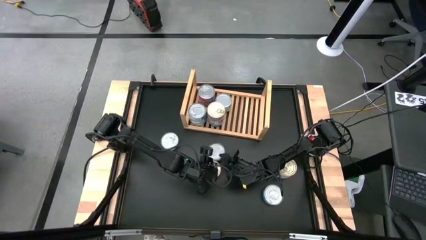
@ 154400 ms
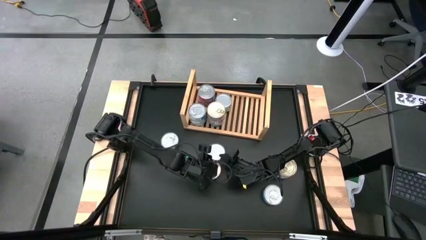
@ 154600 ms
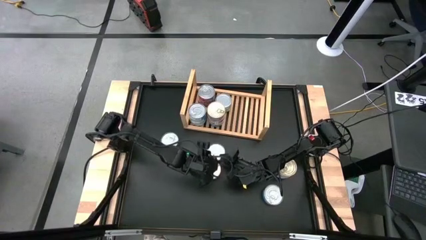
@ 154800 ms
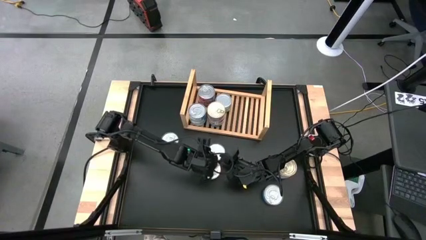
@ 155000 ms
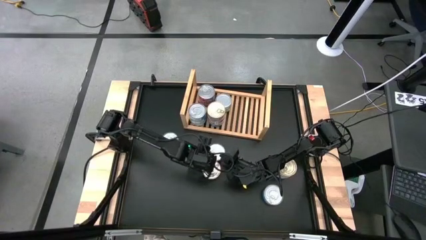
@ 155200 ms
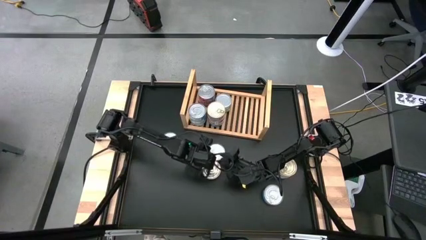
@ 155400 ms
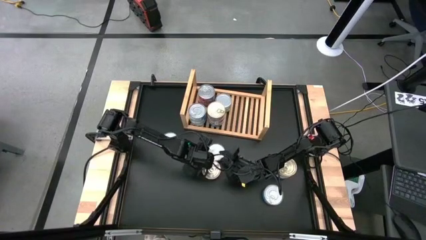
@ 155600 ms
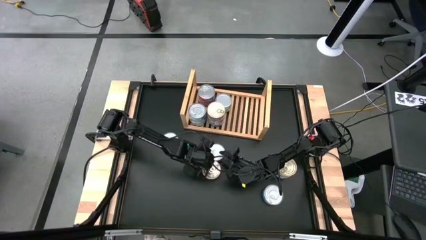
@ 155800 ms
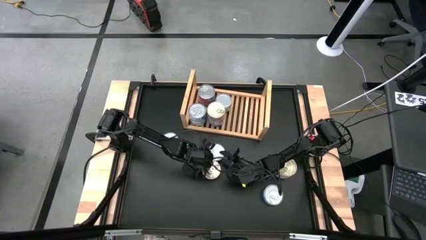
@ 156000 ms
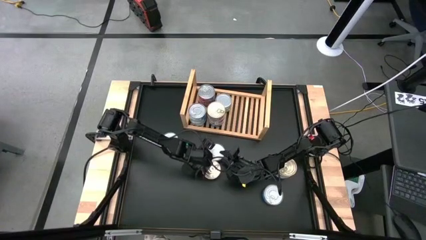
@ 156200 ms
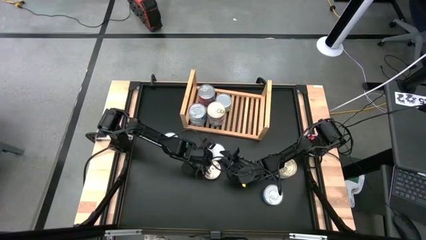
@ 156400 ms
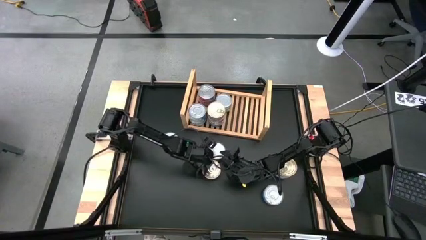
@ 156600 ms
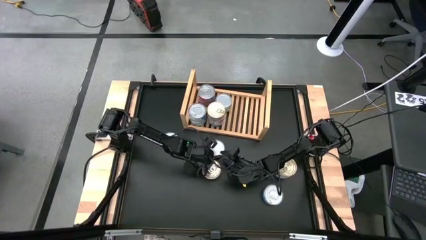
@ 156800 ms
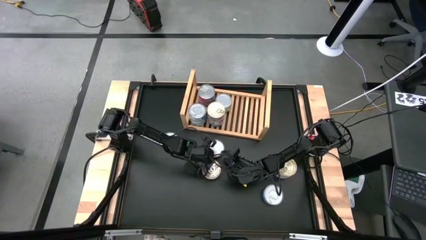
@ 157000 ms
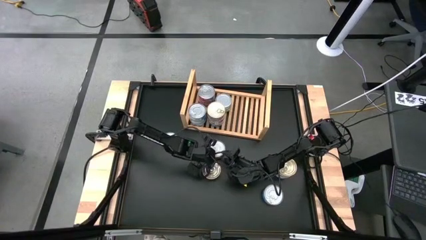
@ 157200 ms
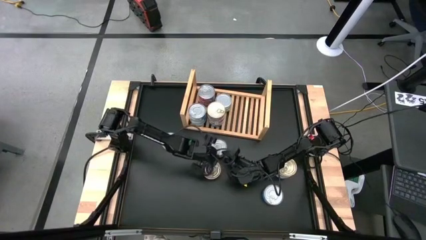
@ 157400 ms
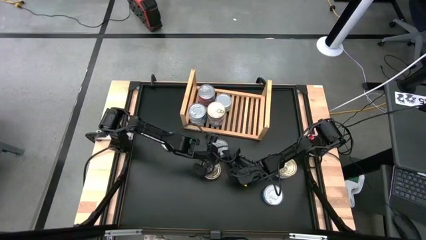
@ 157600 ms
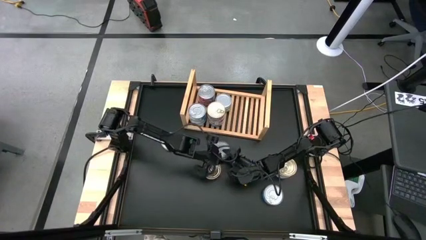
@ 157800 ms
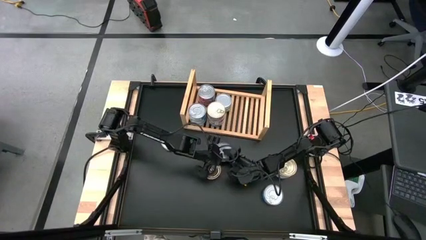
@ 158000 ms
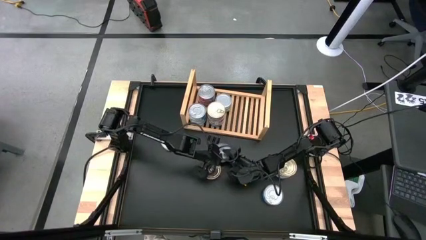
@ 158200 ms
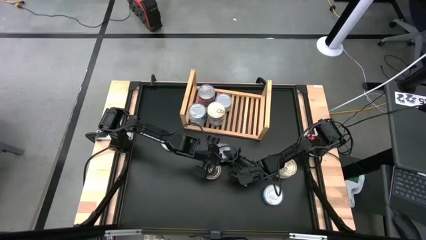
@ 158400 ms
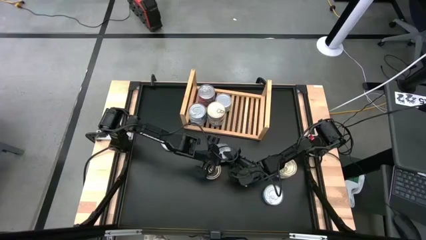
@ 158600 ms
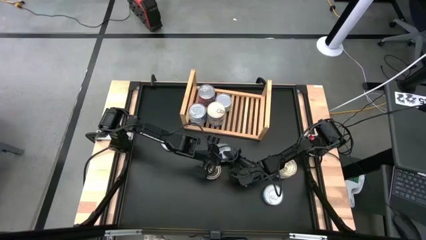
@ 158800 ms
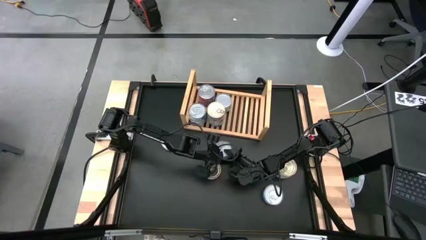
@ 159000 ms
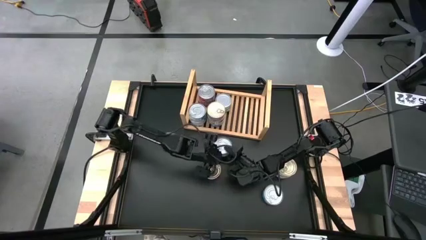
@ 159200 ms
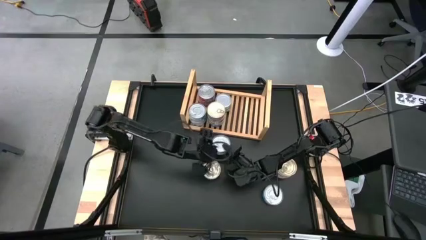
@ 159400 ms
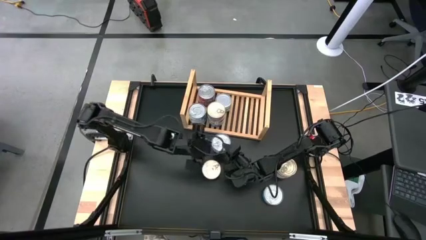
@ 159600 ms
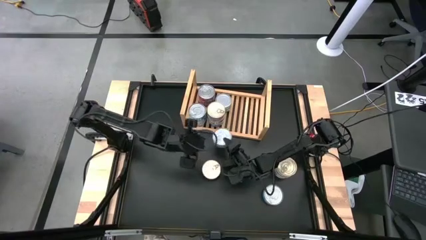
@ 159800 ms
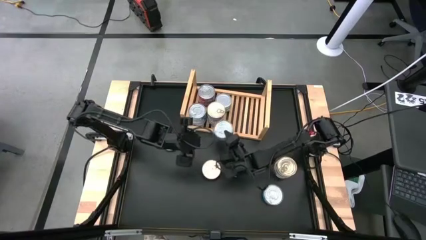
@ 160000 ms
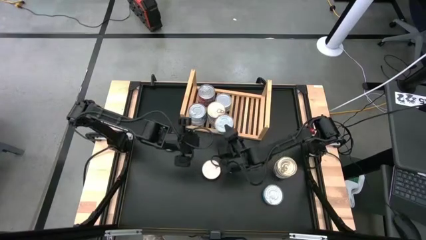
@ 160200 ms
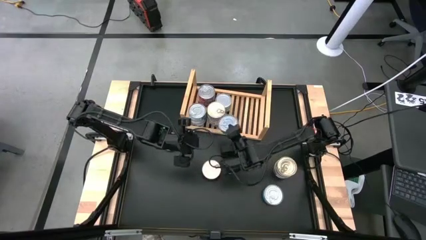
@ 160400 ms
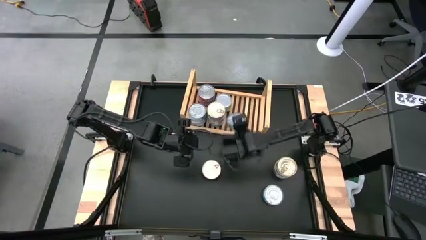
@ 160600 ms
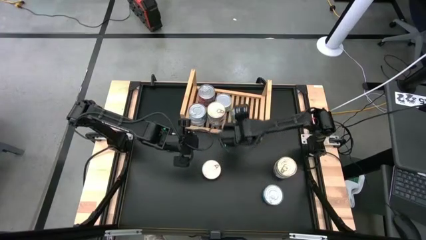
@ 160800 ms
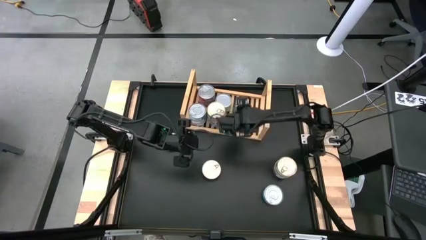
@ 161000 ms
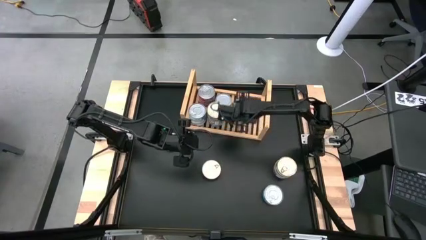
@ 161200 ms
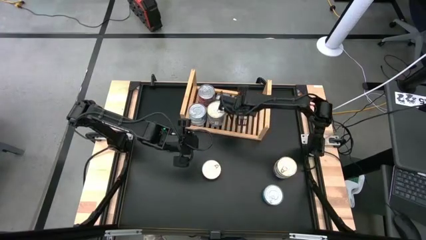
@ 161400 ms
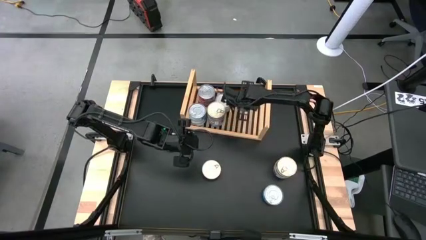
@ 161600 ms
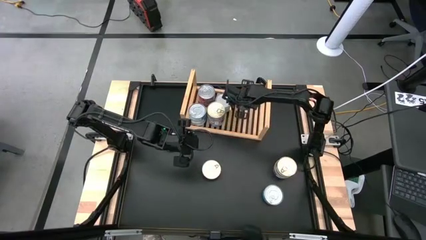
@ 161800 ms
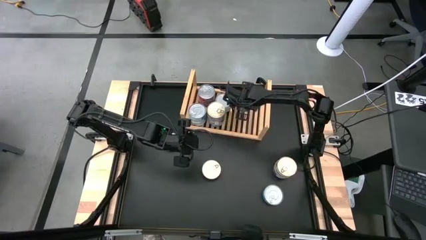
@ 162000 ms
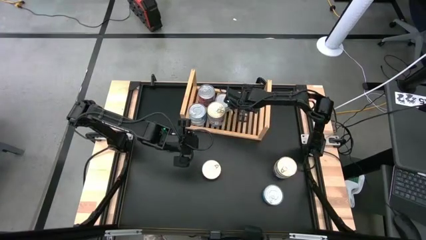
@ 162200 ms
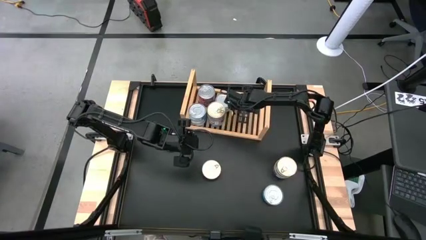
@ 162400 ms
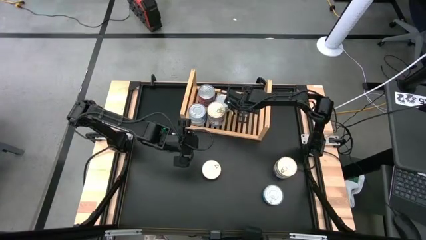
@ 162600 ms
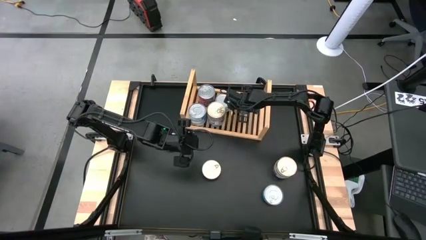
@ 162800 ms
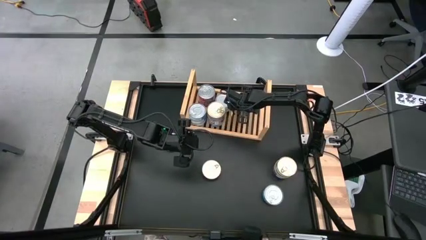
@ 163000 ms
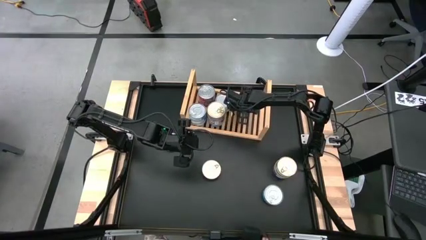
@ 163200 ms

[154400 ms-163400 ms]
Task: Stack canned seafood by type on shelf
Put the green tuna can on the shelf

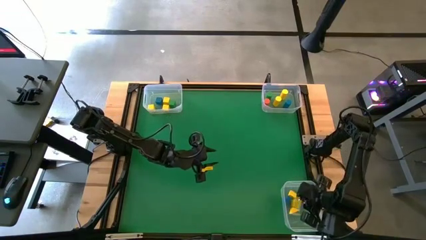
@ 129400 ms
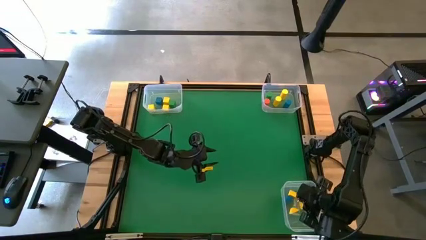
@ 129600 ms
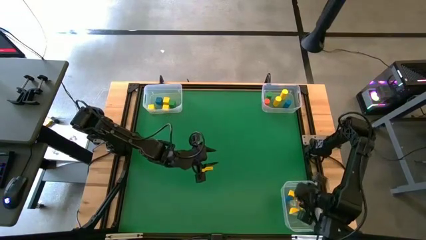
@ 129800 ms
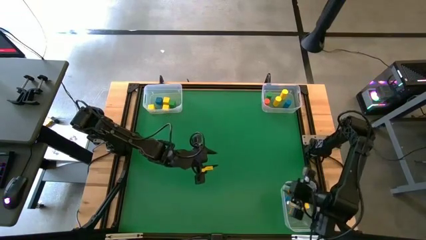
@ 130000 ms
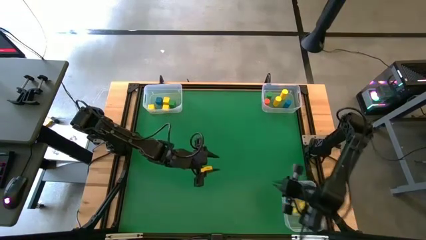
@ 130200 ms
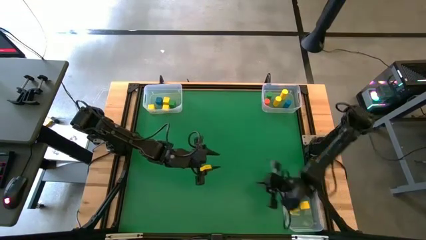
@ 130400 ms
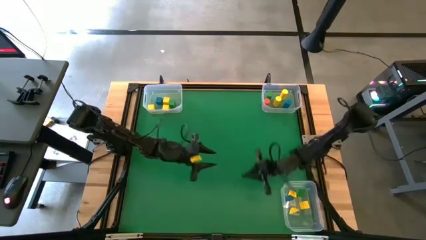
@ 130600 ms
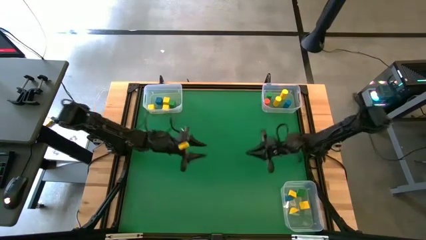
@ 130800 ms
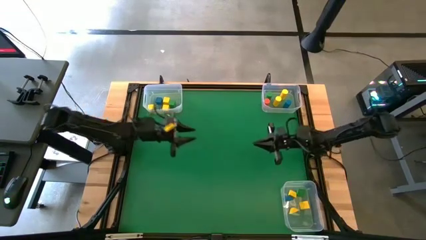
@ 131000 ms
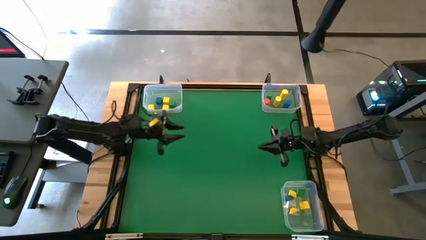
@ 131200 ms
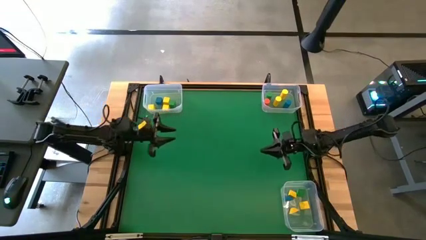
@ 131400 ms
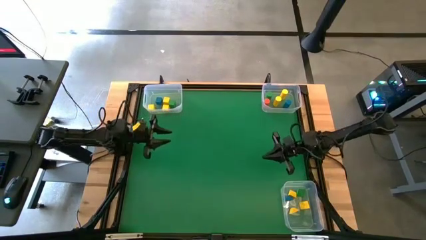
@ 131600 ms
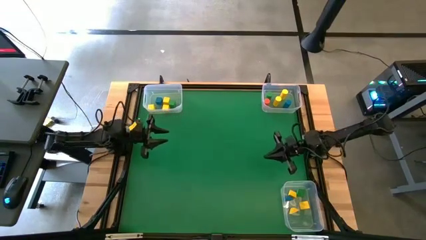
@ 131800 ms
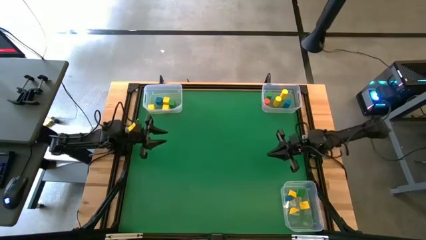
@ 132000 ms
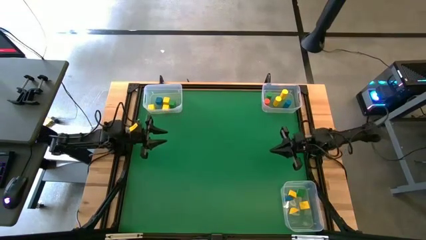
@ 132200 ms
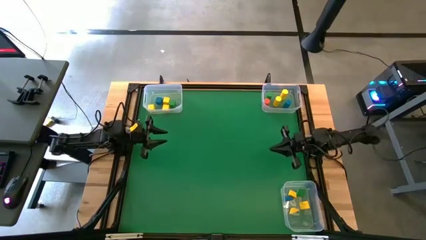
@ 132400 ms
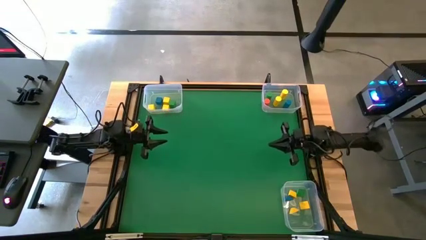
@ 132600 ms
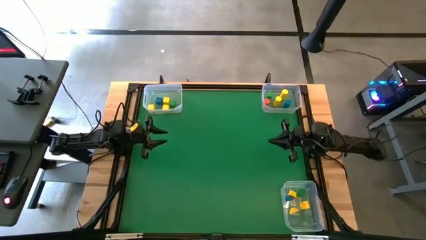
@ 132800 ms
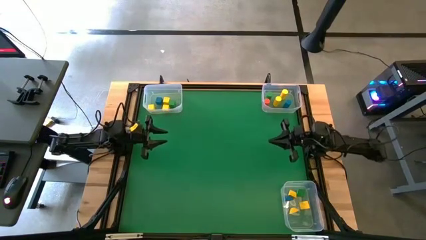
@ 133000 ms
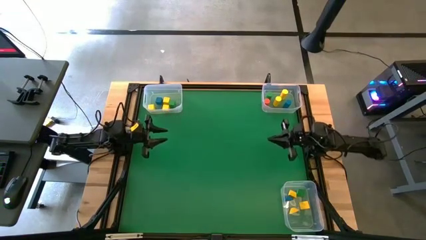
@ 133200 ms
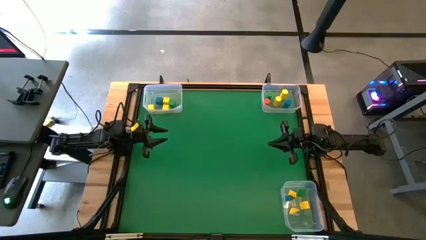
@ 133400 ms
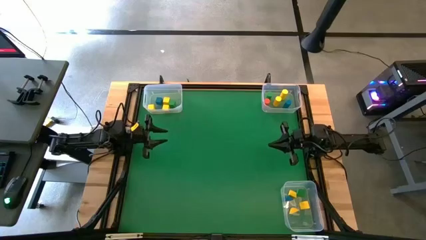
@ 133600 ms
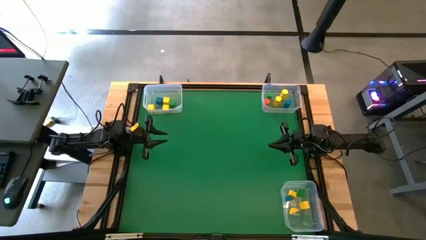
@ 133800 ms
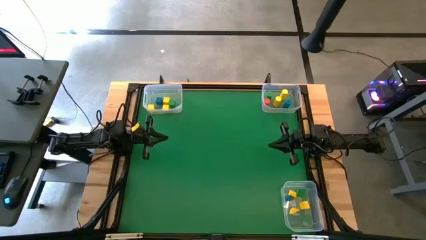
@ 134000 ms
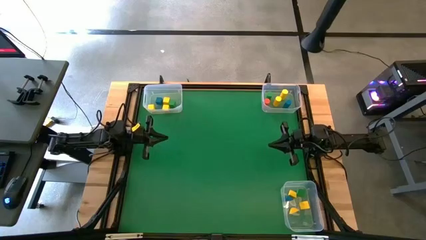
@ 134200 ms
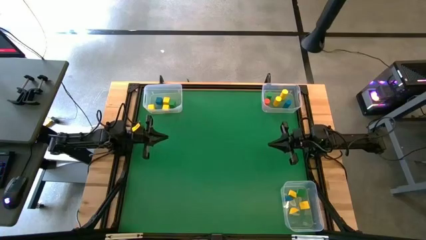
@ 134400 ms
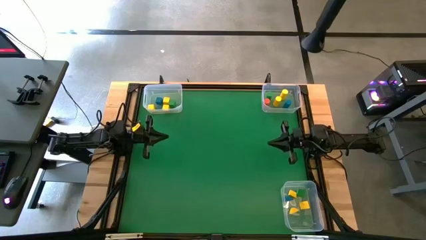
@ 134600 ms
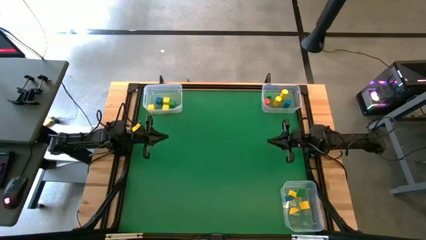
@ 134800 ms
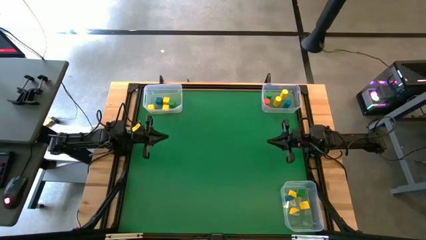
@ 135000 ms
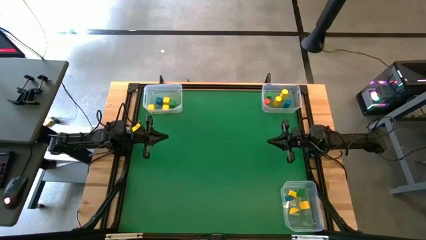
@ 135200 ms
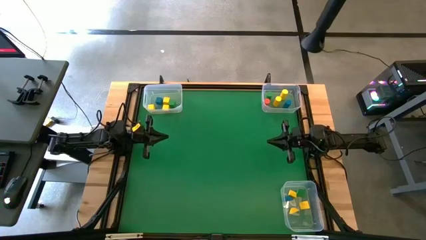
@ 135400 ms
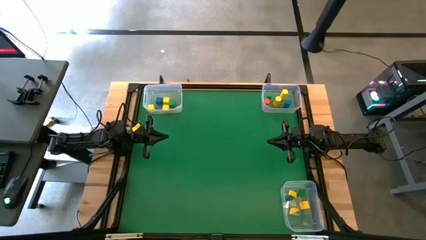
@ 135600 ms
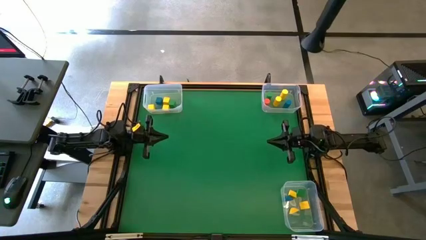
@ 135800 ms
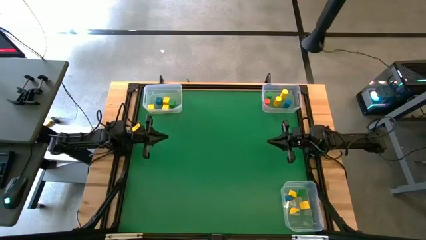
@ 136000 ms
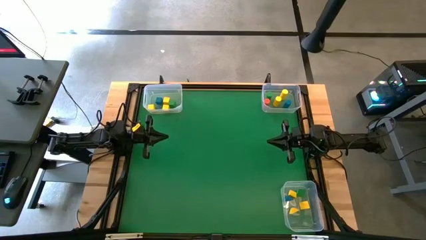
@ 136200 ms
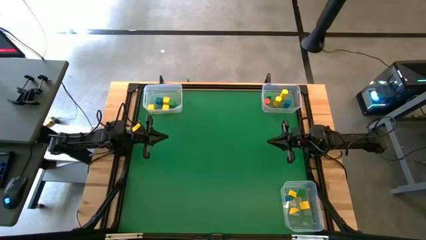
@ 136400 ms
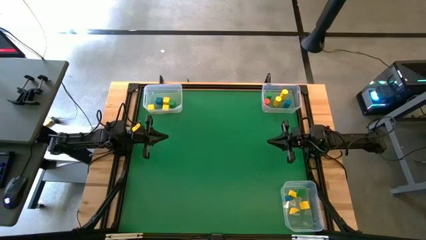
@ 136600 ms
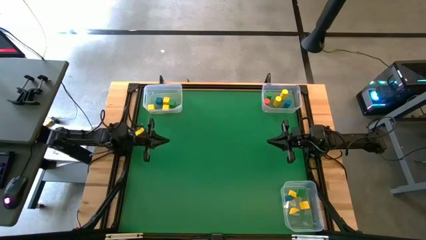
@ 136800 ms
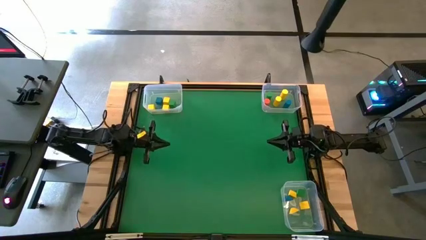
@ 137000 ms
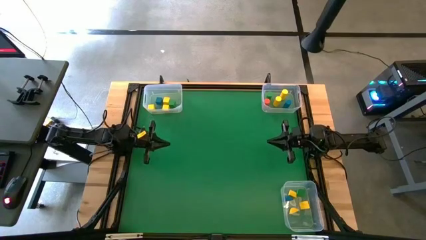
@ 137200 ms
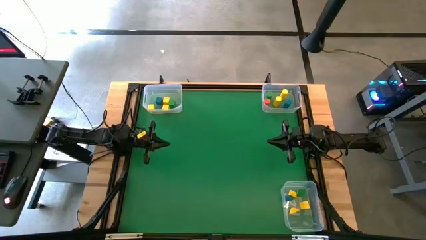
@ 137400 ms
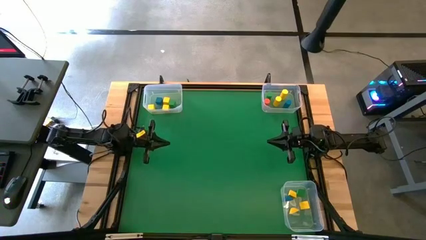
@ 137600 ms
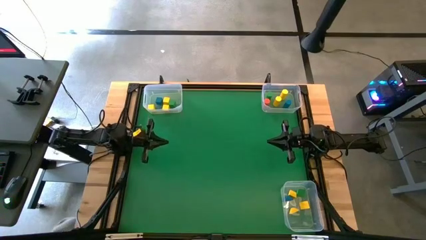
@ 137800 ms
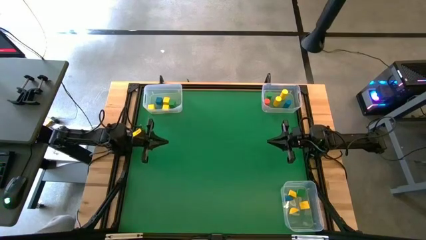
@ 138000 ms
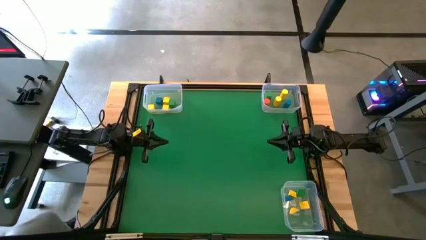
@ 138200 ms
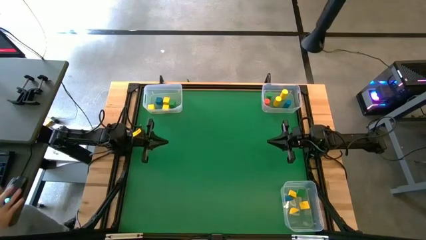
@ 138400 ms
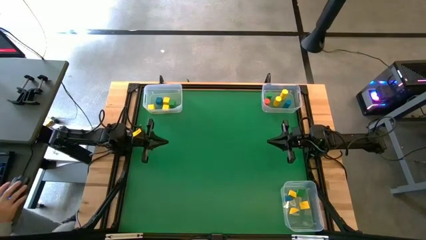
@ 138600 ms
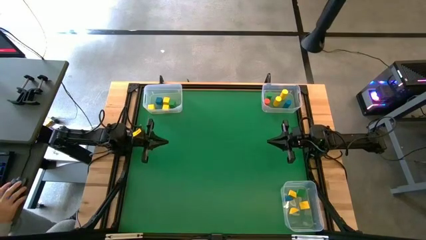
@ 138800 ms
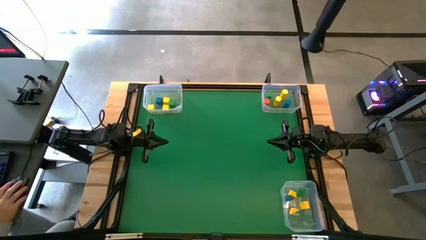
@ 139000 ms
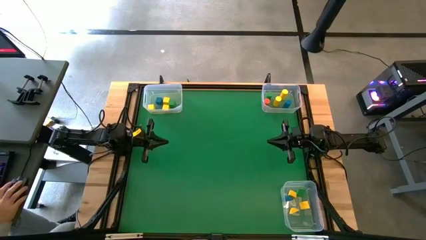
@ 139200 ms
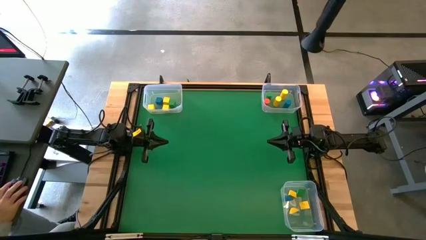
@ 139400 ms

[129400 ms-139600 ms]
Task: Sort blocks by size
Return to Home Position
